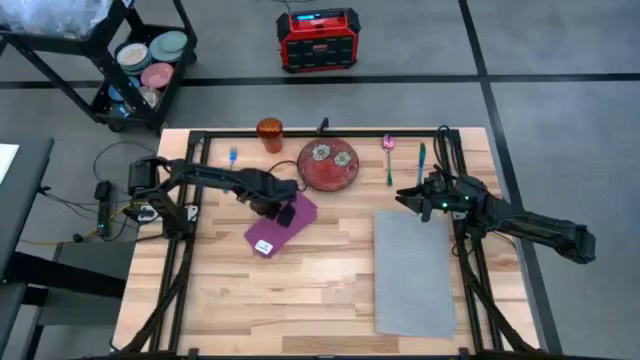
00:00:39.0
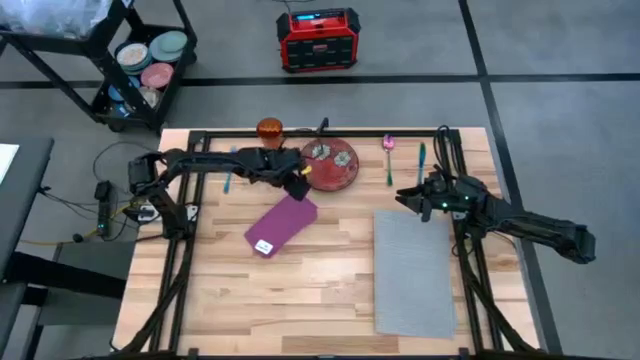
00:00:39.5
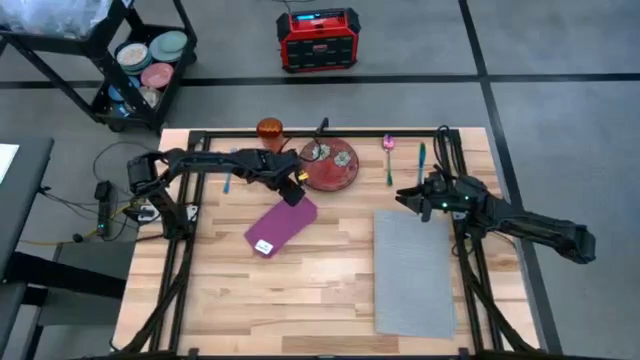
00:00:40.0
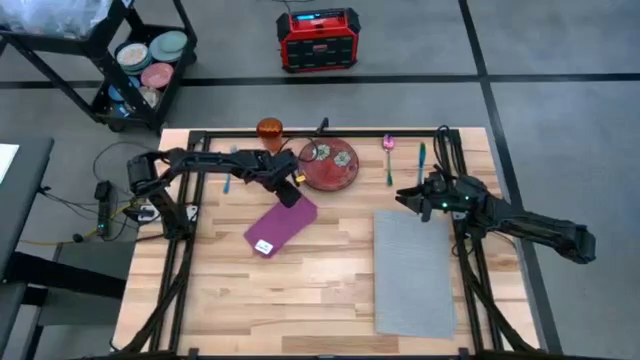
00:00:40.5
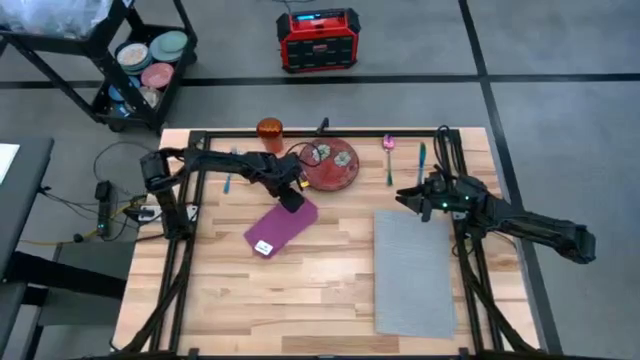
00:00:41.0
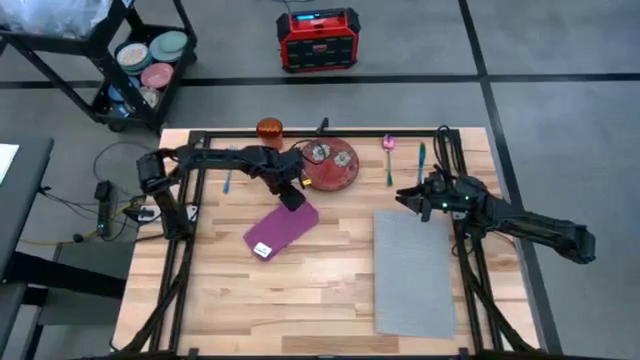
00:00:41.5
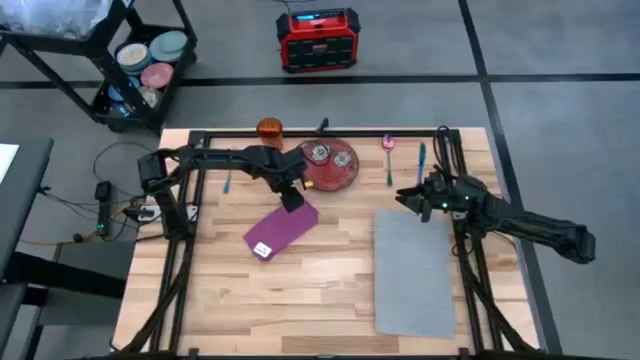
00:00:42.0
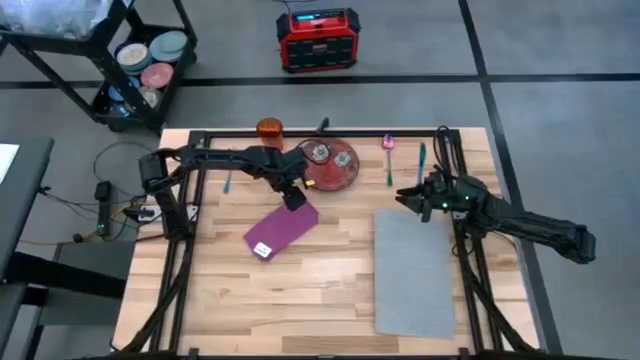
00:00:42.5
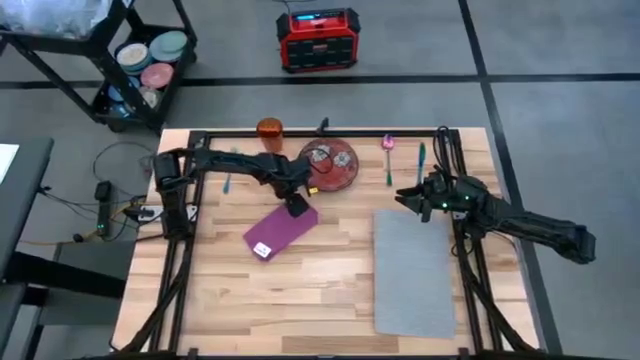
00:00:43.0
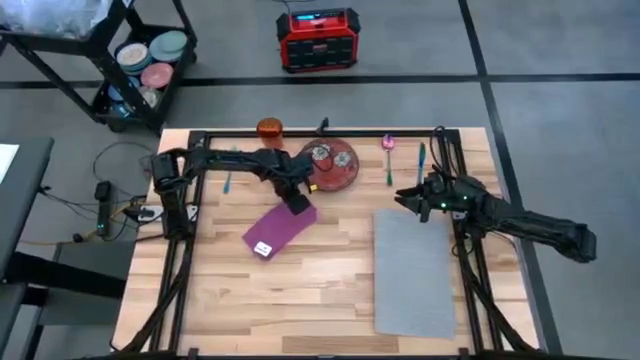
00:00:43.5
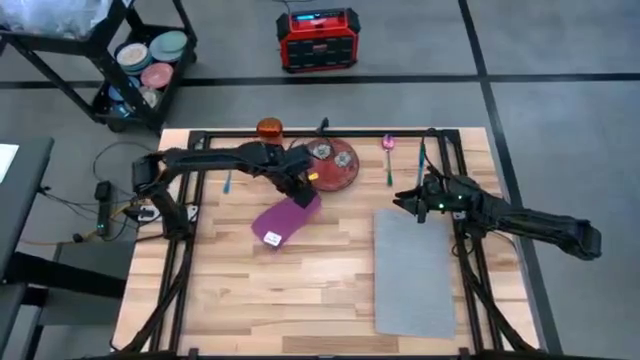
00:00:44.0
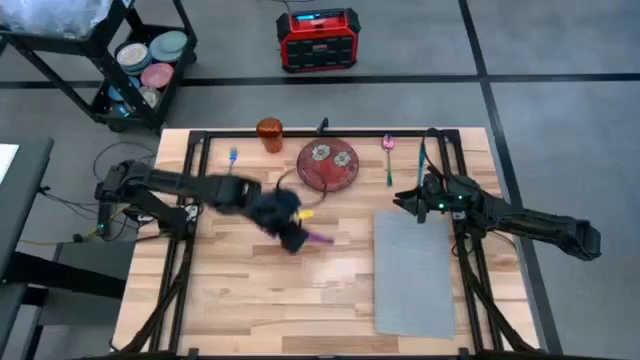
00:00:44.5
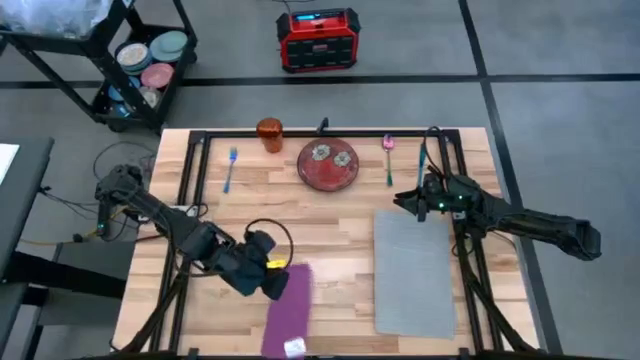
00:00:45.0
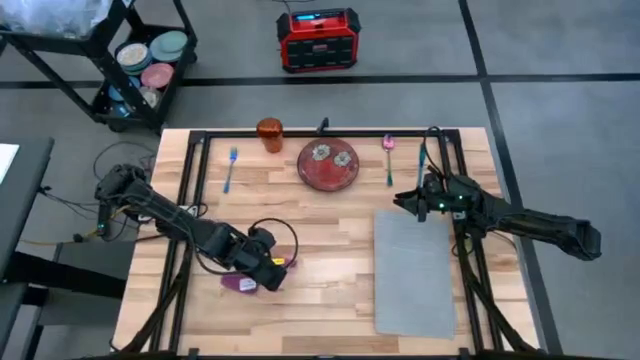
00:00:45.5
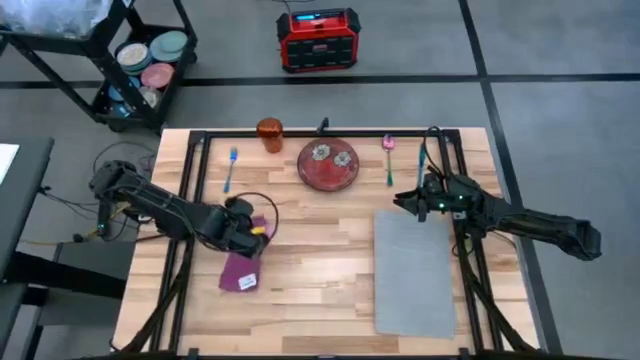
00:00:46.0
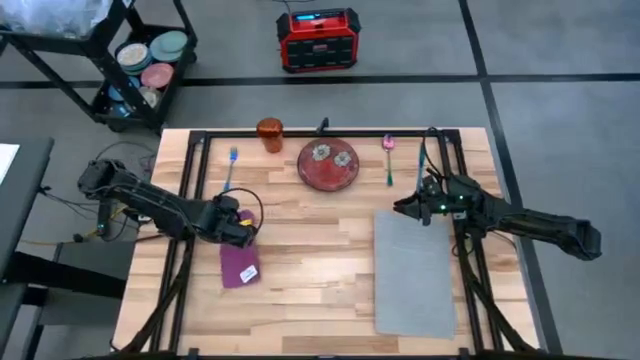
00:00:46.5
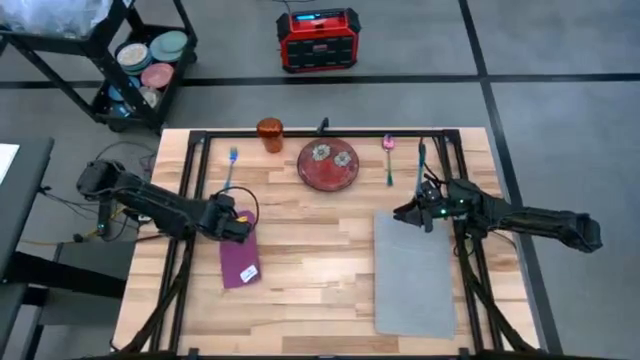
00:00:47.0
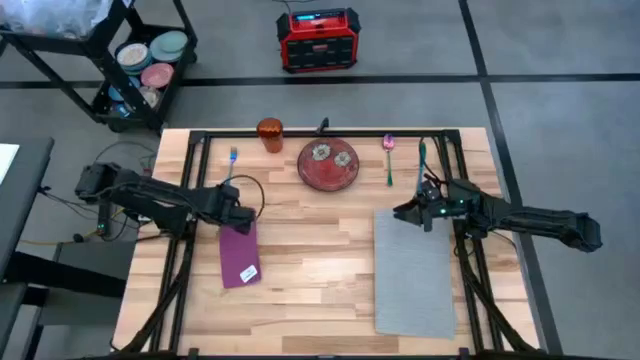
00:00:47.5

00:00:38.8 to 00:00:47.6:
Task: Set table place
Move the purple table napkin to the left of the table

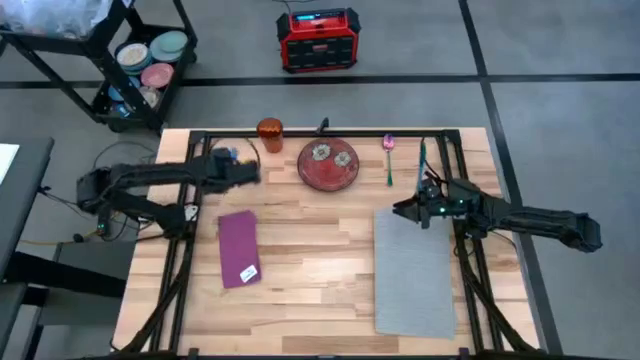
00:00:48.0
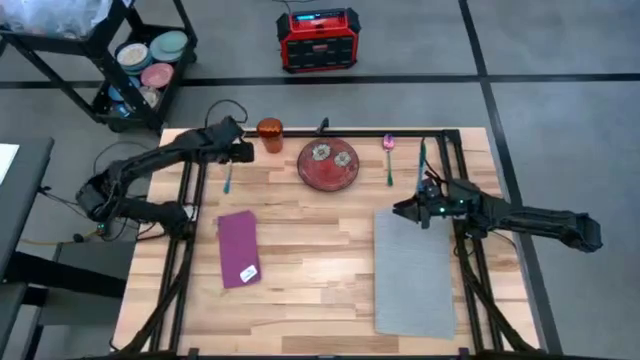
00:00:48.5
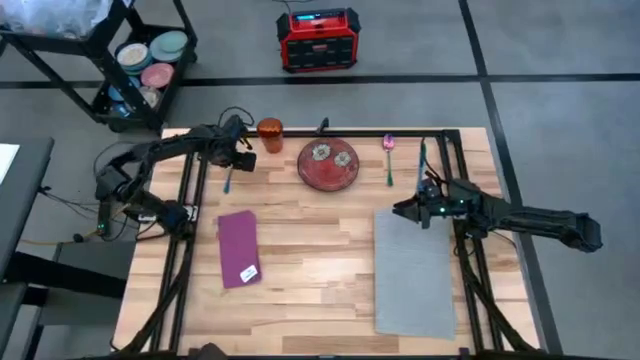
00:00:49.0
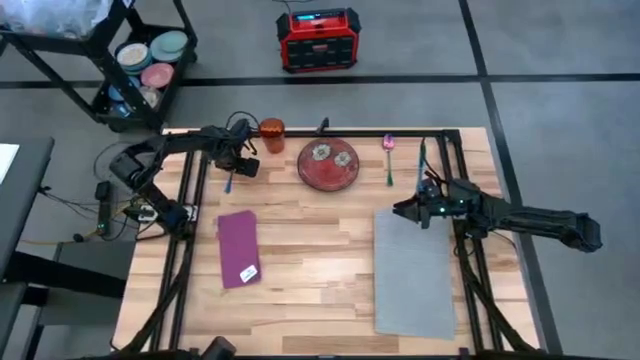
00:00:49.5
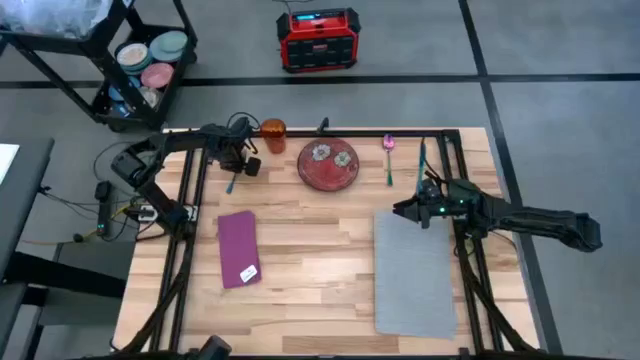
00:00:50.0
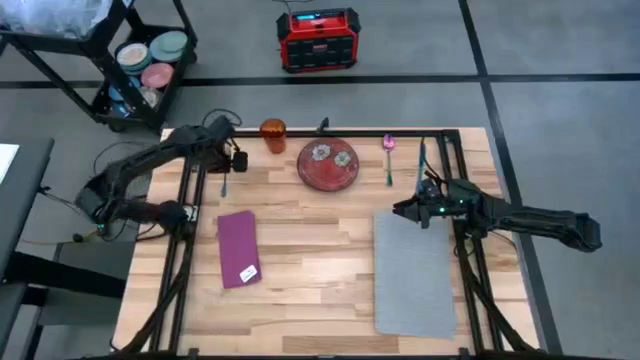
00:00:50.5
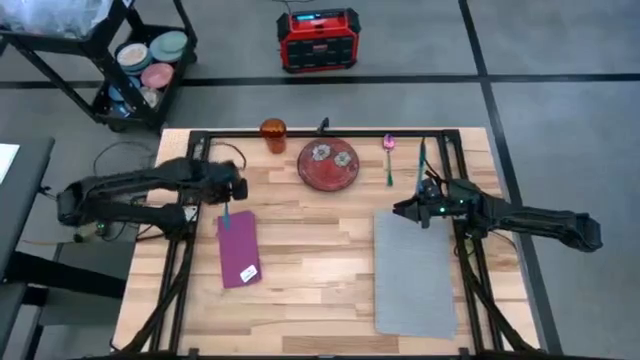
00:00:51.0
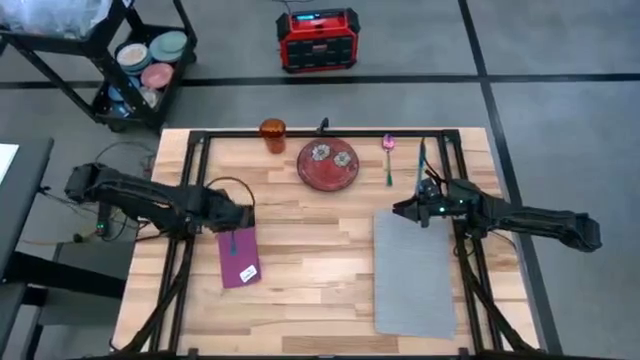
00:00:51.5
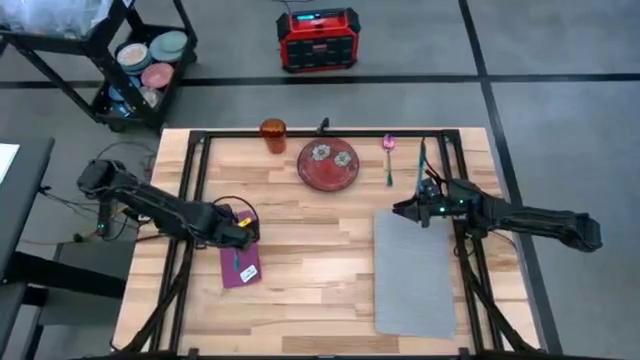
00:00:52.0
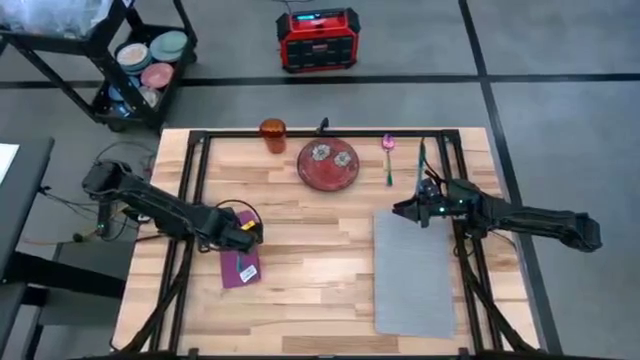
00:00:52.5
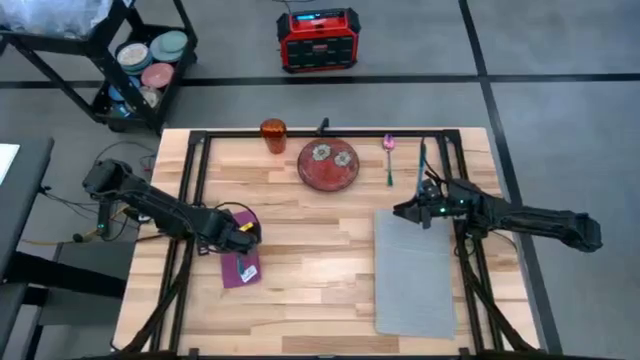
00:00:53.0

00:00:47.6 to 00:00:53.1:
Put the blue fork on the purple table napkin

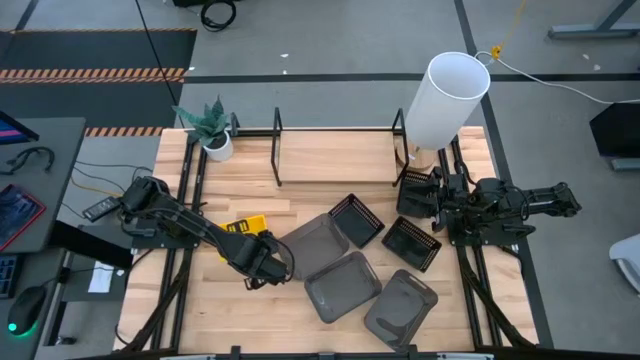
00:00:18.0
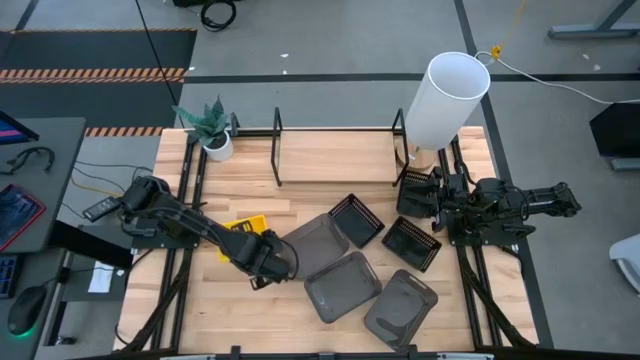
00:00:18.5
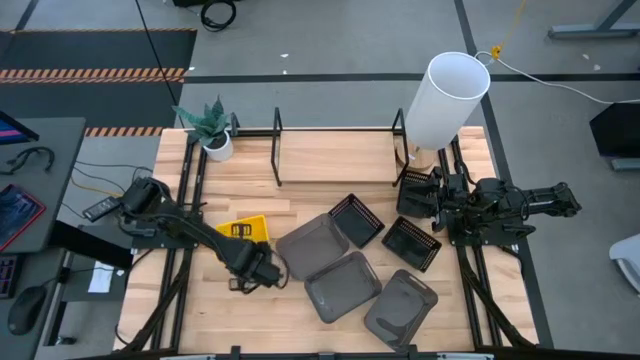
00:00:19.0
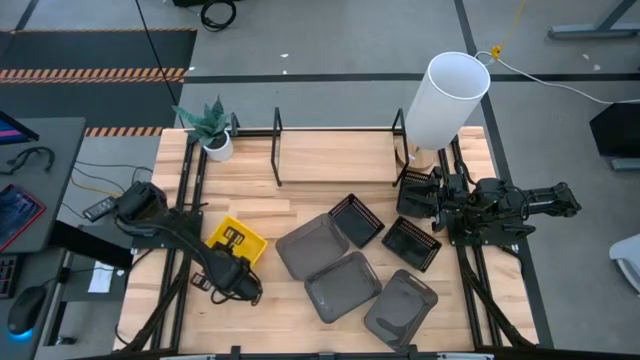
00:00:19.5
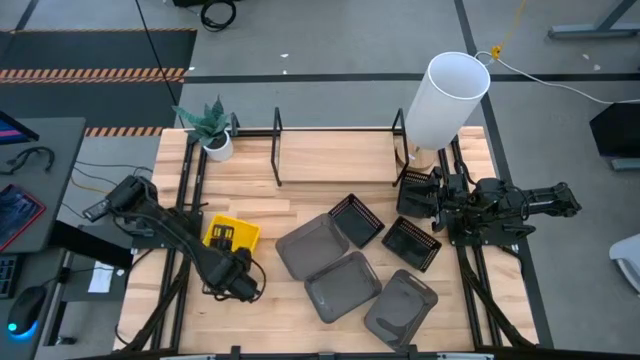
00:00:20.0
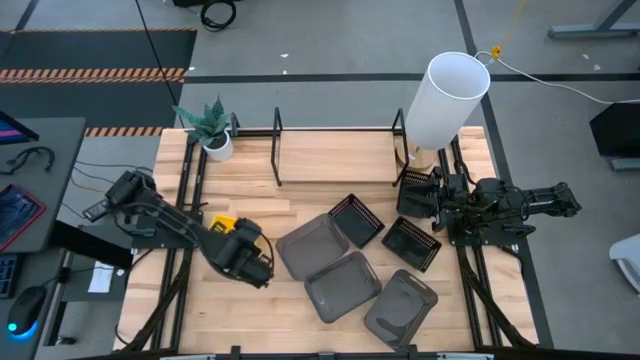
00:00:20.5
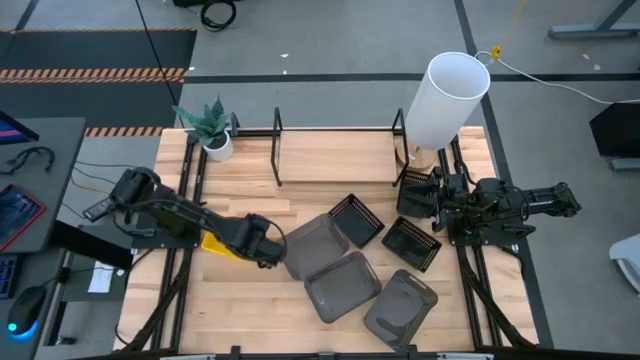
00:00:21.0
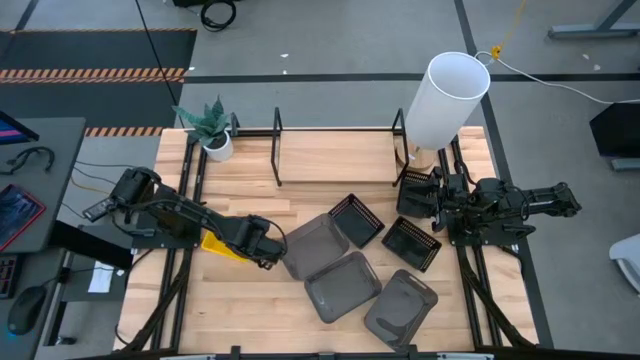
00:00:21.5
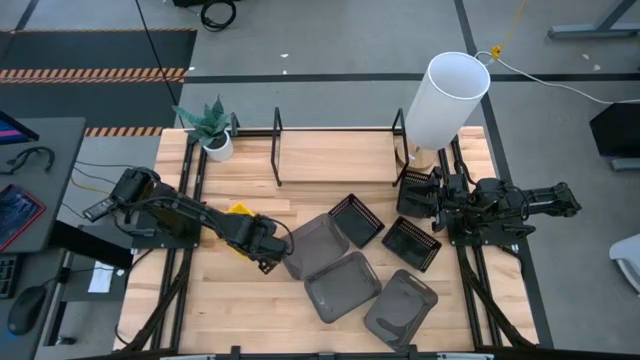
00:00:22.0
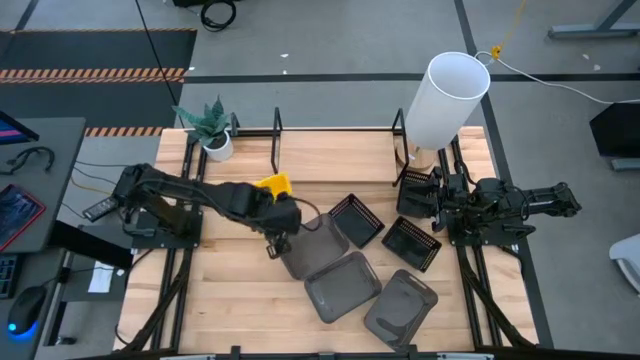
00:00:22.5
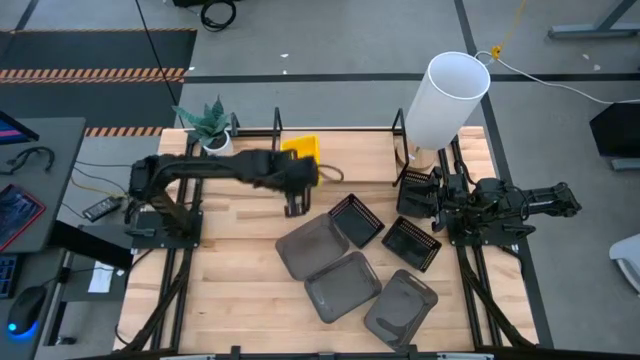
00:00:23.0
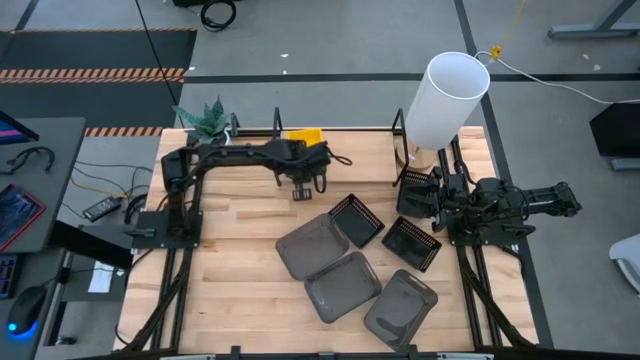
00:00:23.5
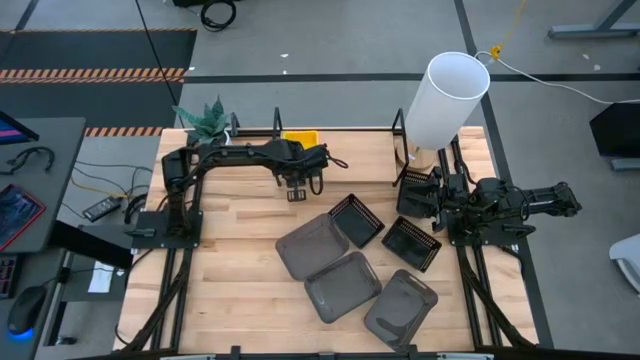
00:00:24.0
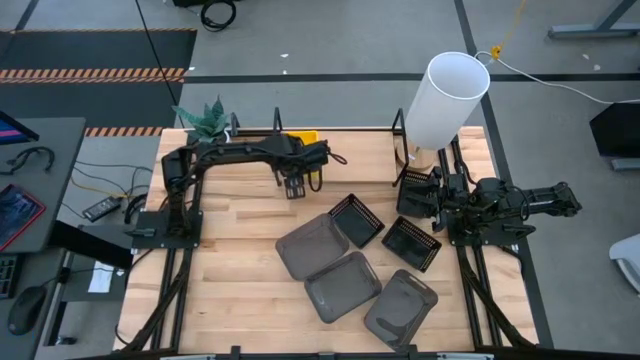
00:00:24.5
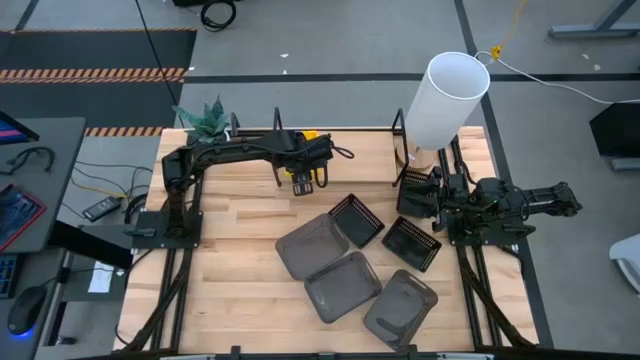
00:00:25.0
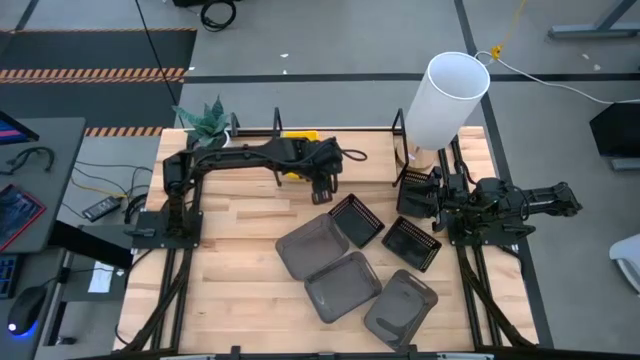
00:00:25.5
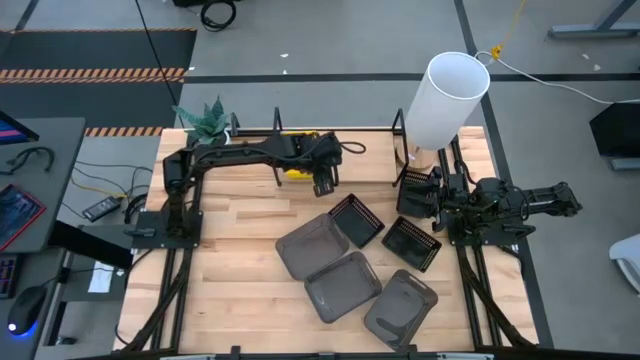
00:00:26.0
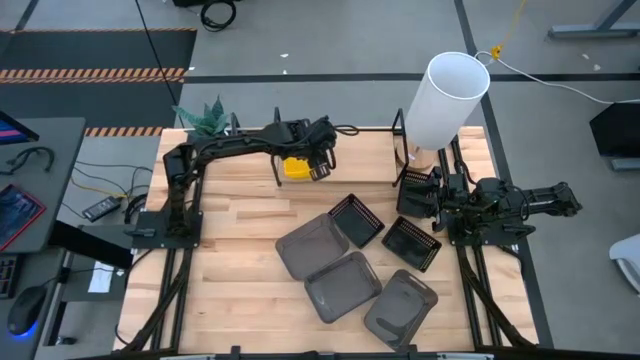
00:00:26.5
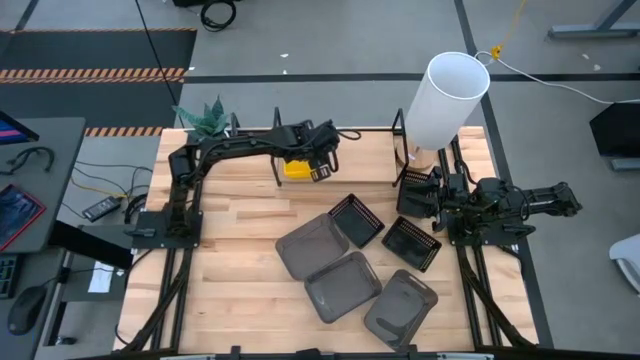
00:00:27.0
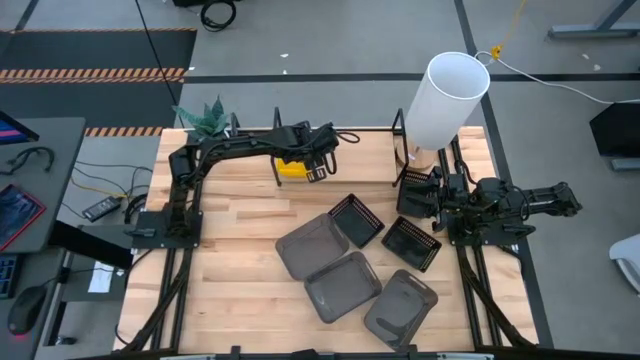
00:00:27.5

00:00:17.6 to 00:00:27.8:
Task: Stack baskets on shelf by color
Put the stacked yellow bins on the shelf
